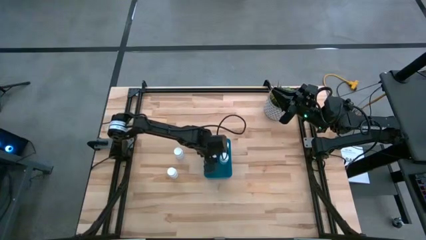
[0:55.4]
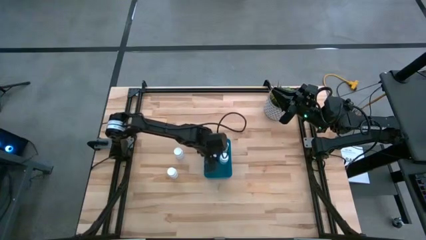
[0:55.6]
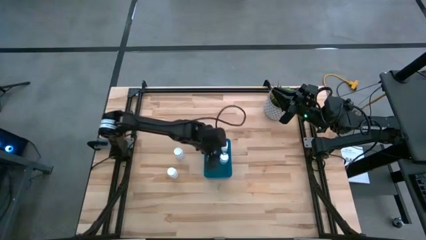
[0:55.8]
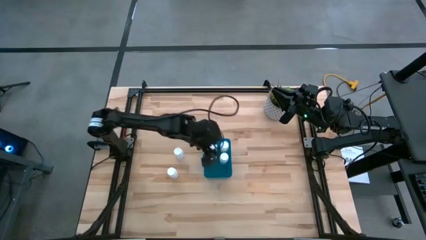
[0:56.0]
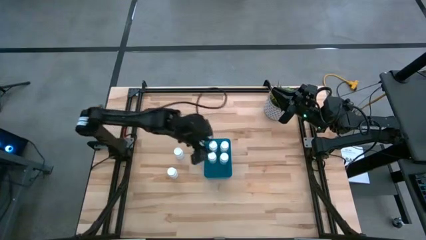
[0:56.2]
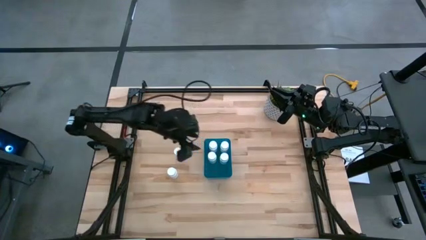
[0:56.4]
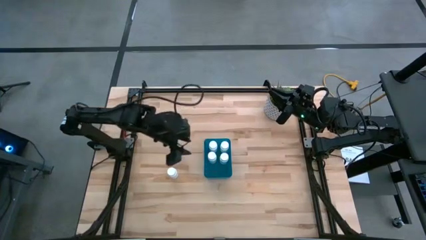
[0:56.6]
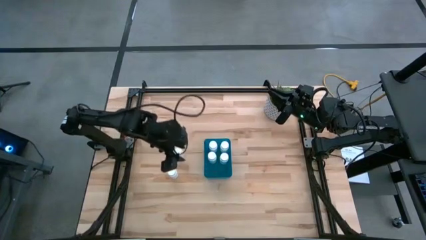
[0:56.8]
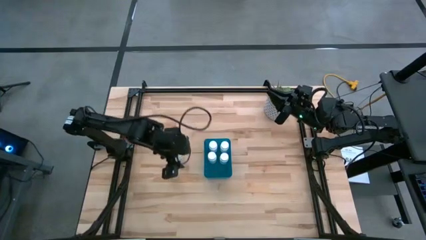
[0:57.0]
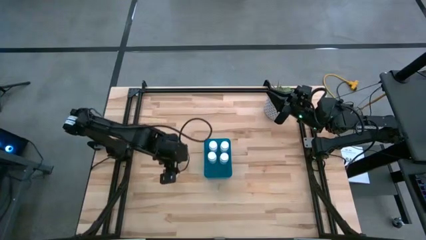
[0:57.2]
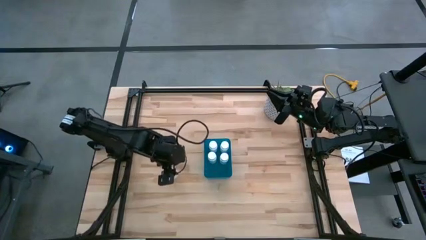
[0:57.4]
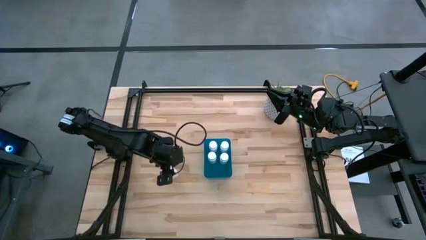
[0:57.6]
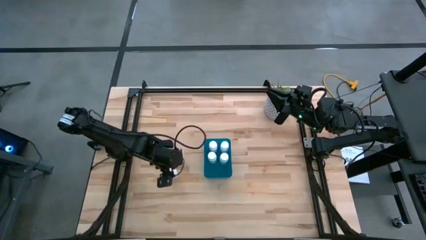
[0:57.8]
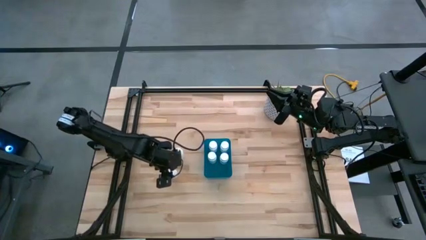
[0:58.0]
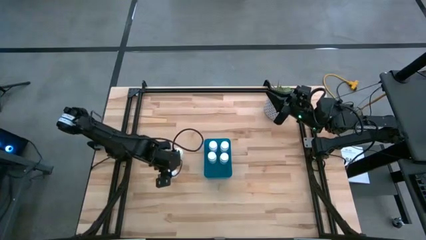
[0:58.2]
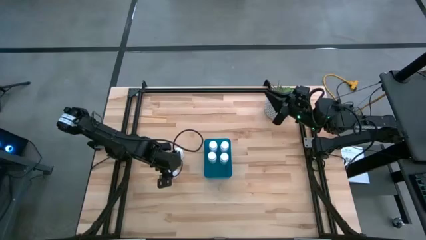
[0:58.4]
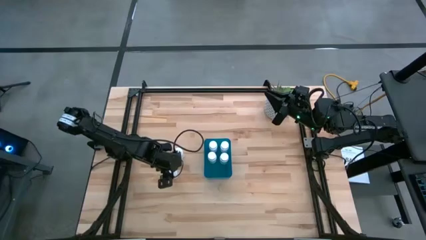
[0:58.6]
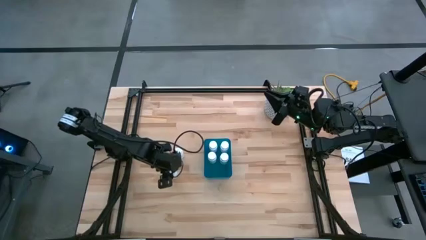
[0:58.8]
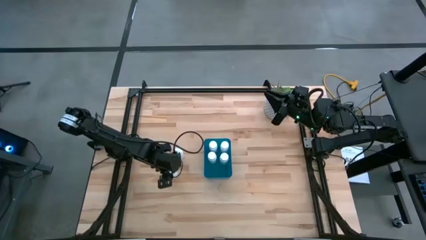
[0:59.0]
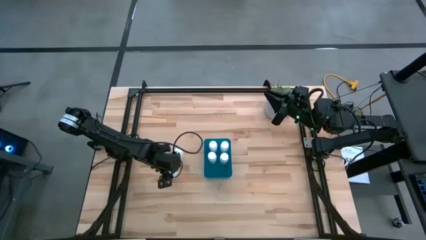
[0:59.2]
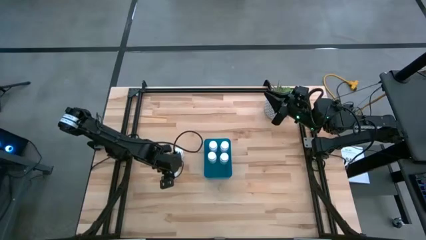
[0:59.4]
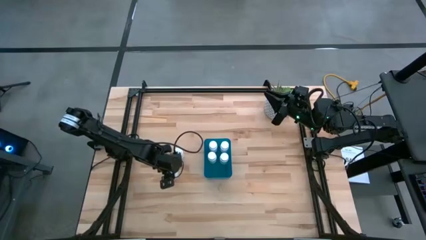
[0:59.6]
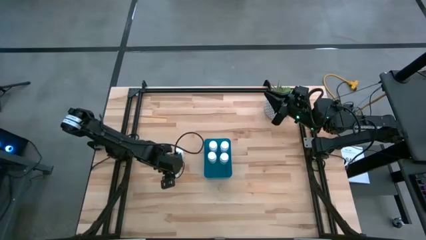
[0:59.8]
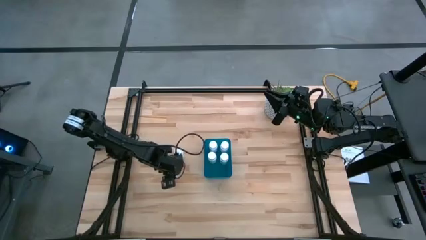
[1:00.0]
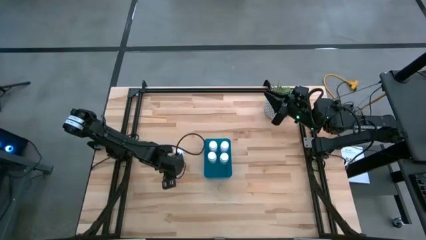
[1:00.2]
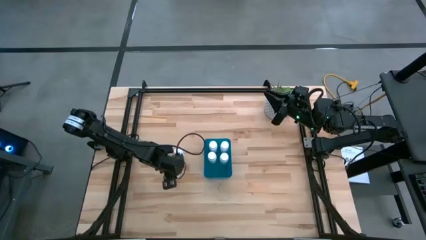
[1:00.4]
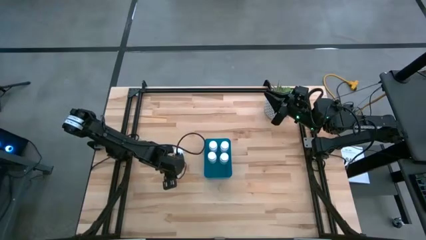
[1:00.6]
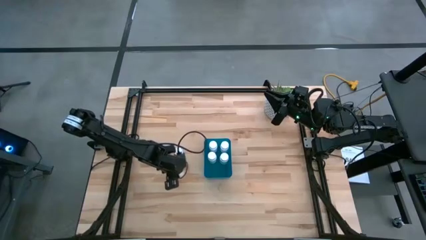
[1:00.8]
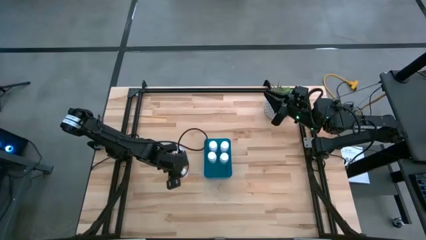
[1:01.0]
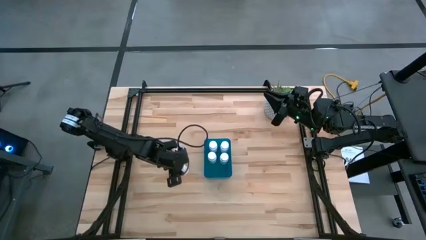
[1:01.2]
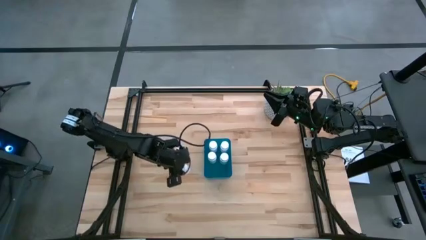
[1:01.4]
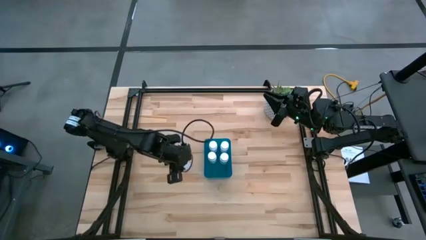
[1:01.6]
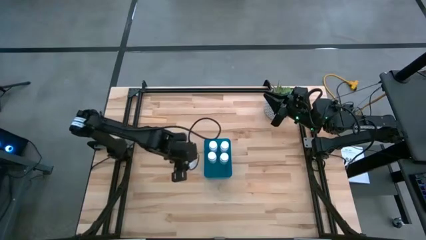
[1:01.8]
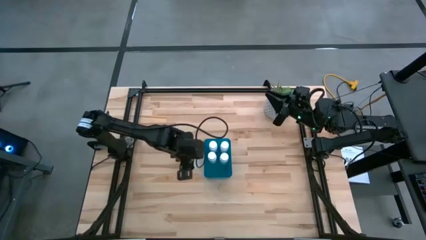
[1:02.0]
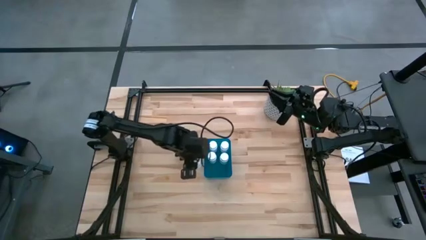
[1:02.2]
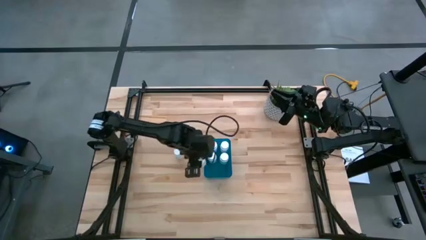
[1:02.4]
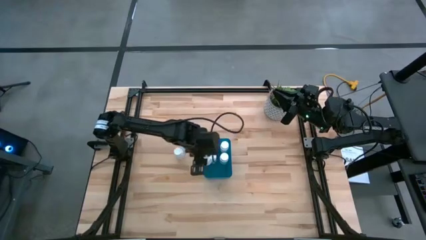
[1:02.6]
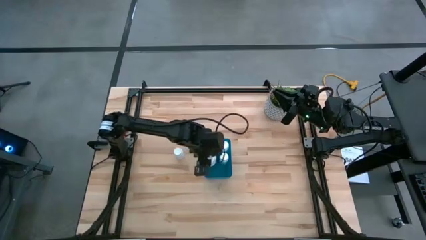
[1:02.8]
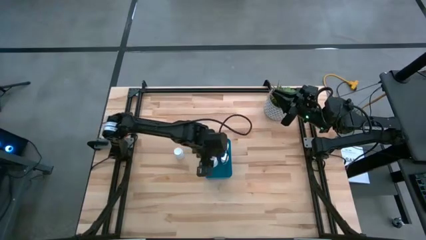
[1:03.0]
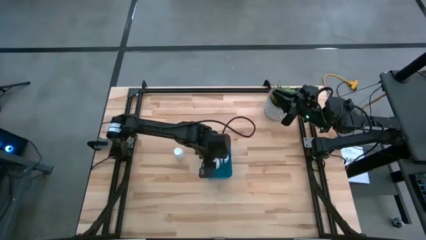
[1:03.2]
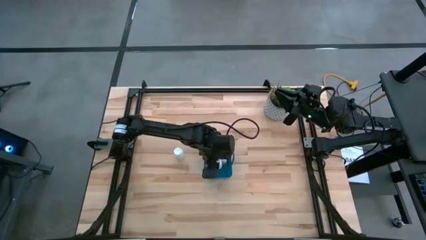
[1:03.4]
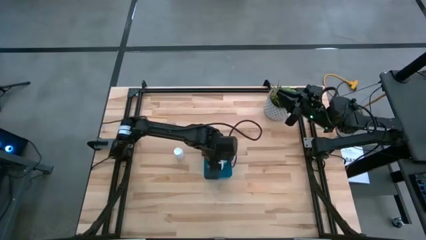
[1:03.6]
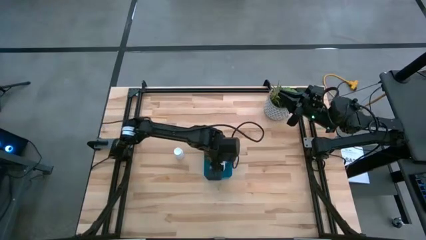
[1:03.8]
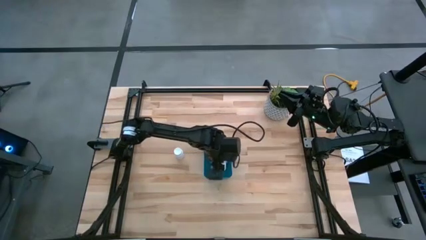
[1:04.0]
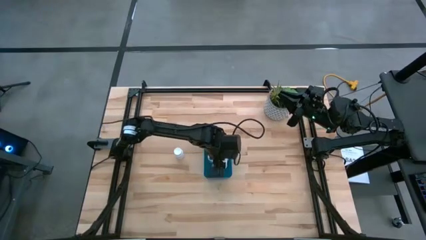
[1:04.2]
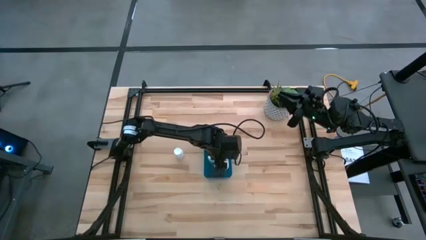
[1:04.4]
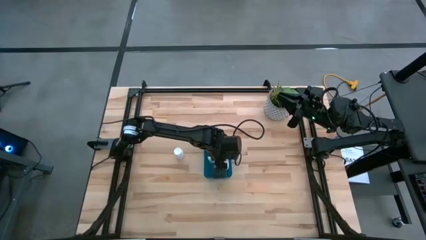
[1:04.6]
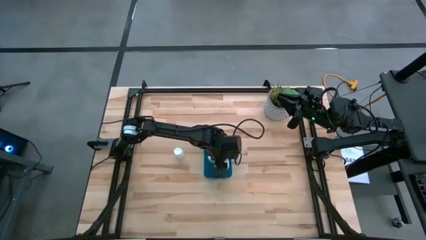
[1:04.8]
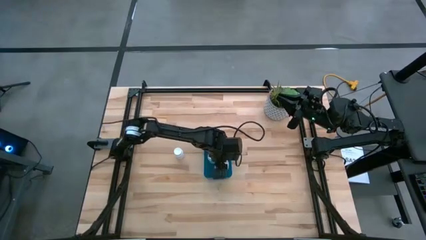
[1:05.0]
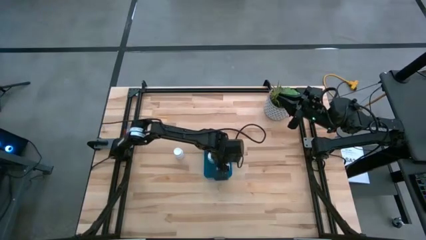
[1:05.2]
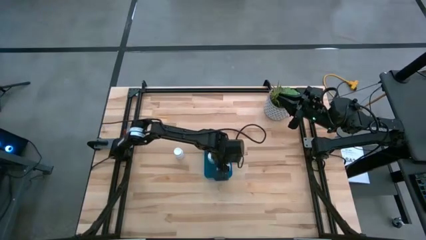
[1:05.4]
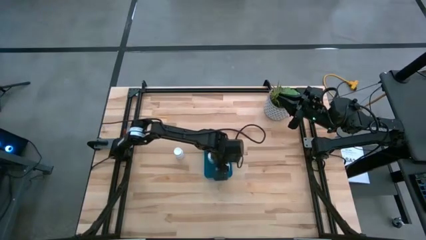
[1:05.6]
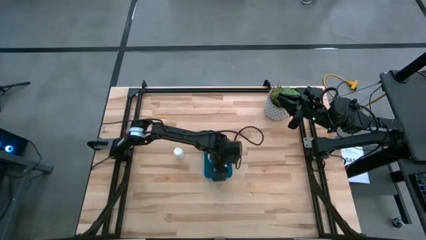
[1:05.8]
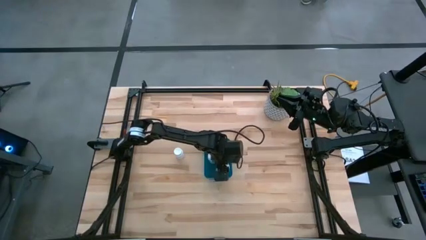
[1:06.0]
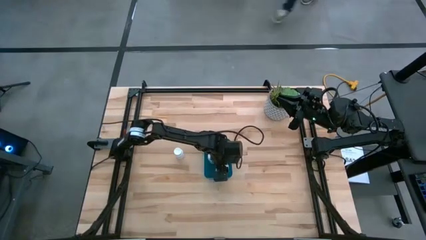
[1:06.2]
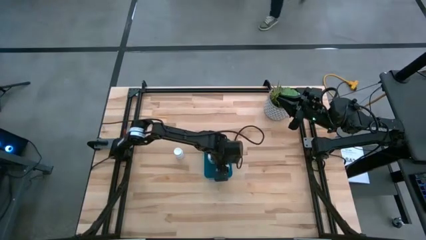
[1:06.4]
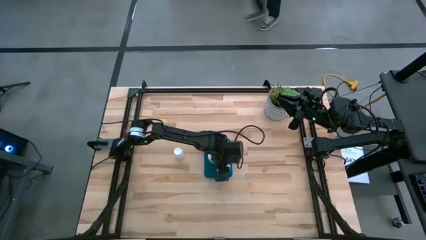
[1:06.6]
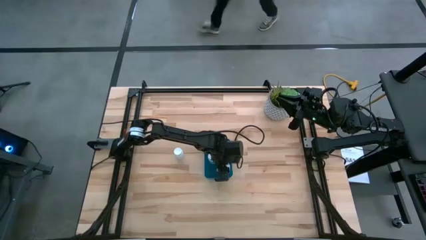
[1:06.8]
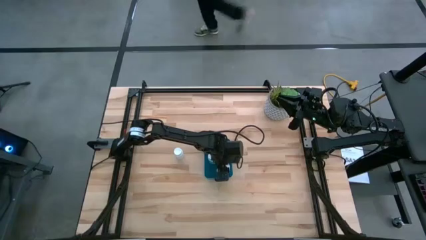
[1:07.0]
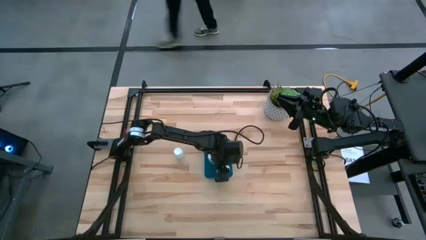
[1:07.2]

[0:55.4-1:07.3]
Task: Pick and place pill bottles into a basket
Put the medicine bottle in the blue bin
